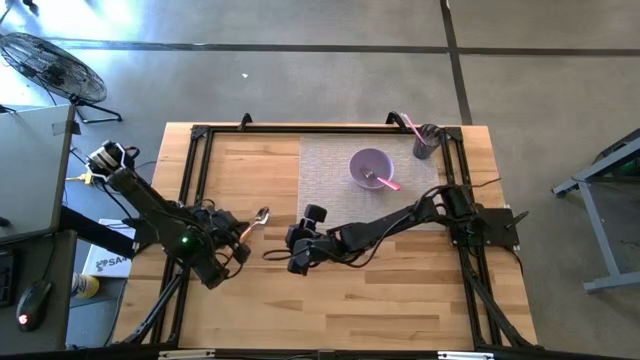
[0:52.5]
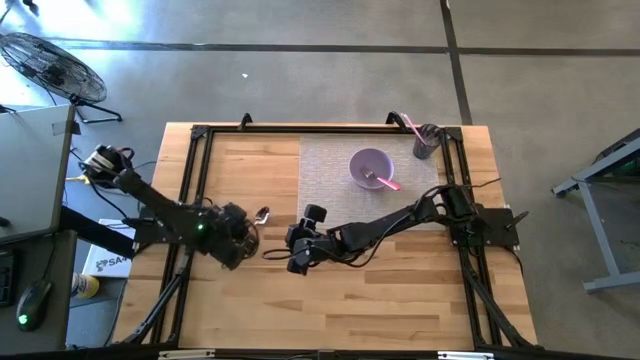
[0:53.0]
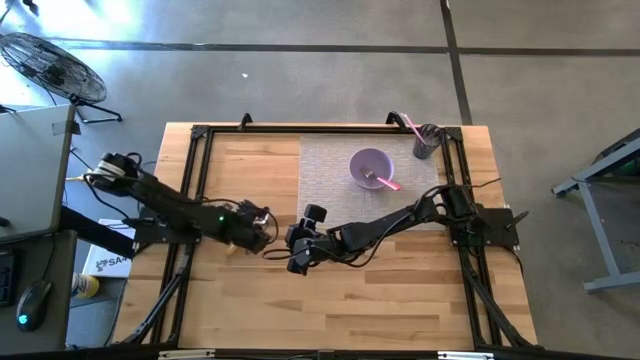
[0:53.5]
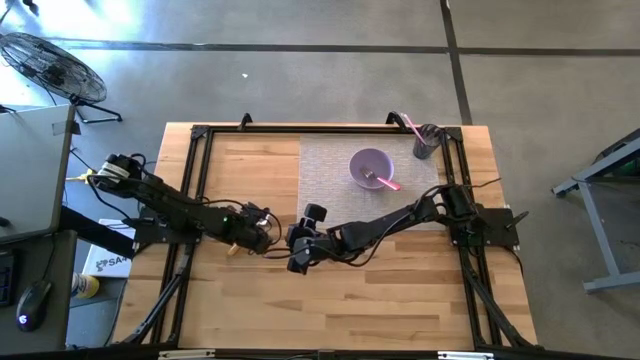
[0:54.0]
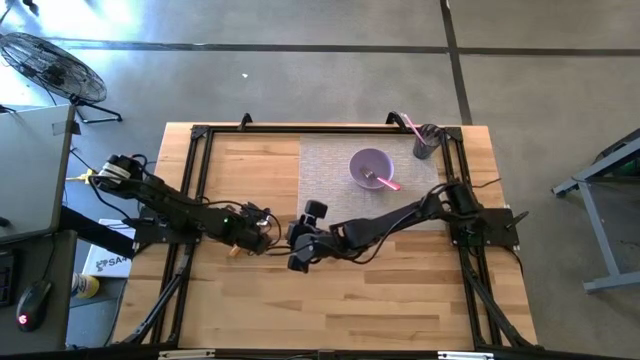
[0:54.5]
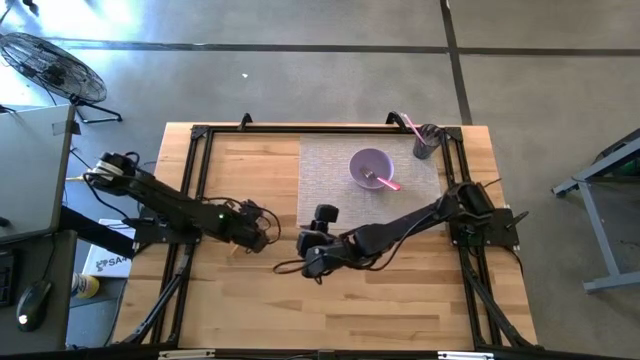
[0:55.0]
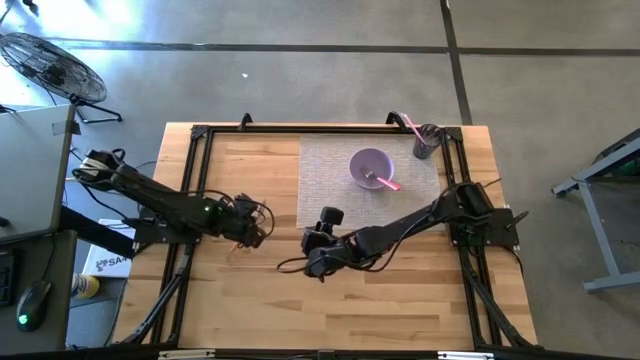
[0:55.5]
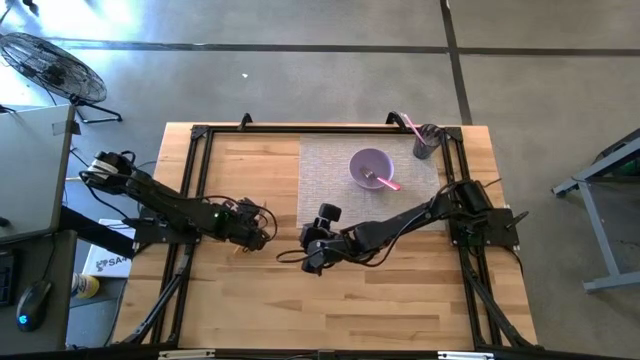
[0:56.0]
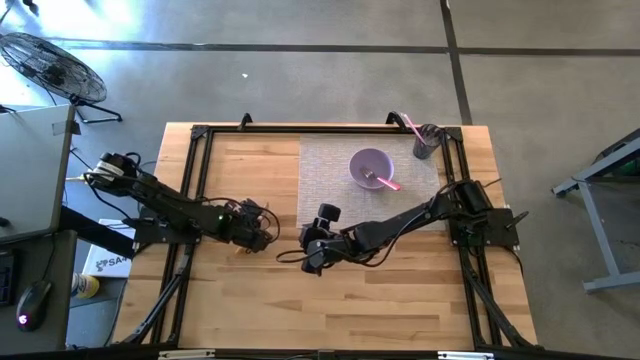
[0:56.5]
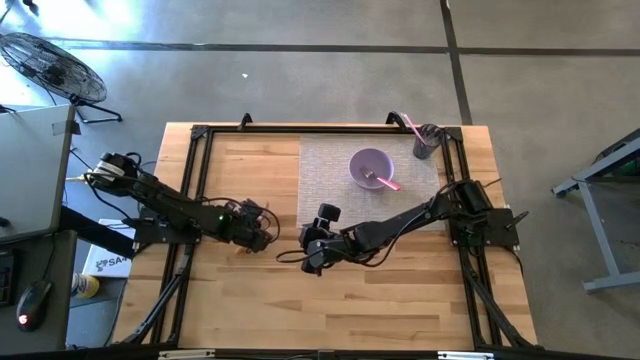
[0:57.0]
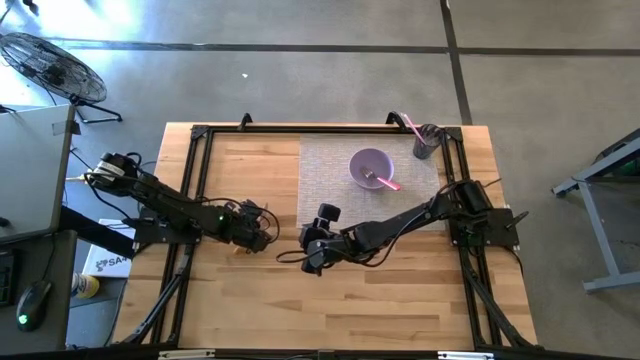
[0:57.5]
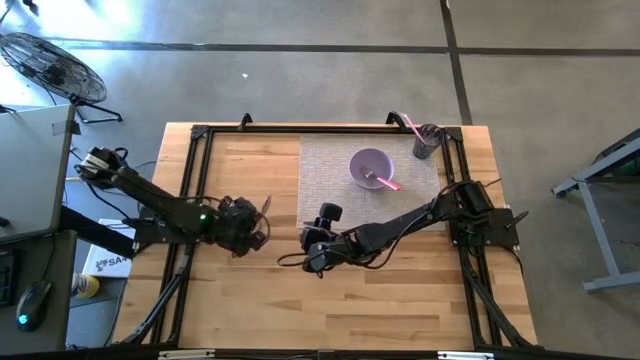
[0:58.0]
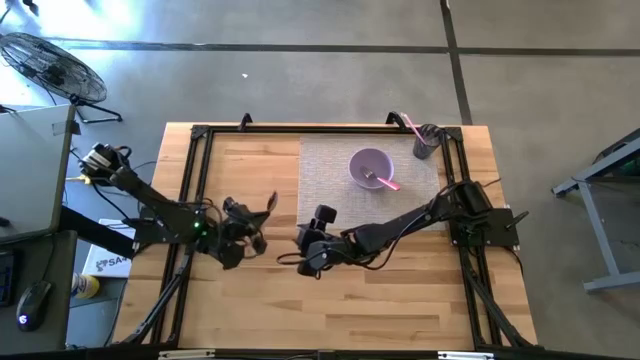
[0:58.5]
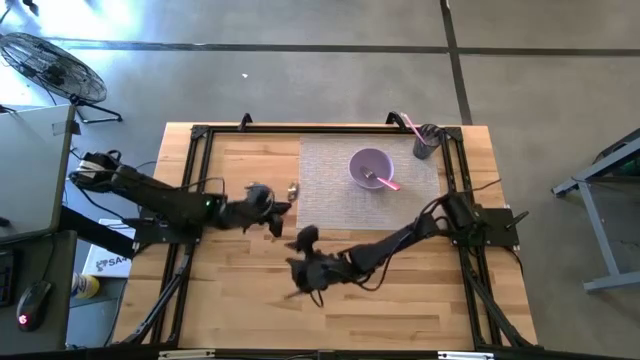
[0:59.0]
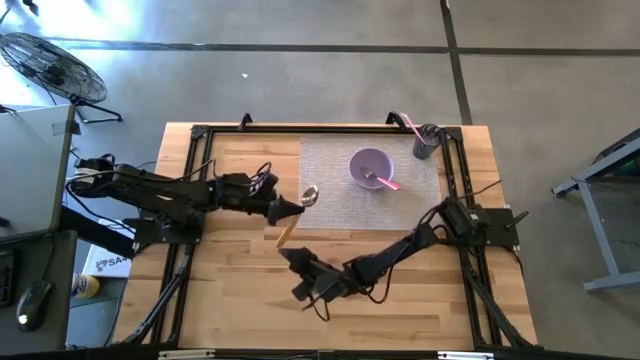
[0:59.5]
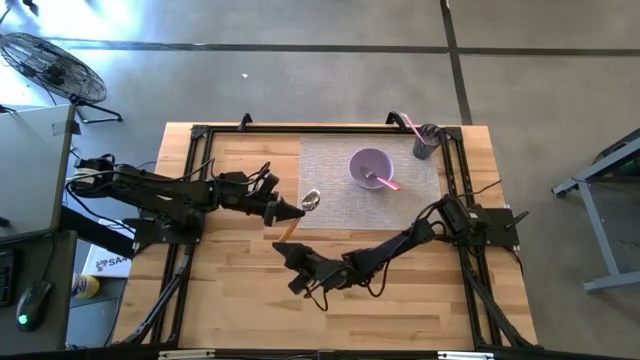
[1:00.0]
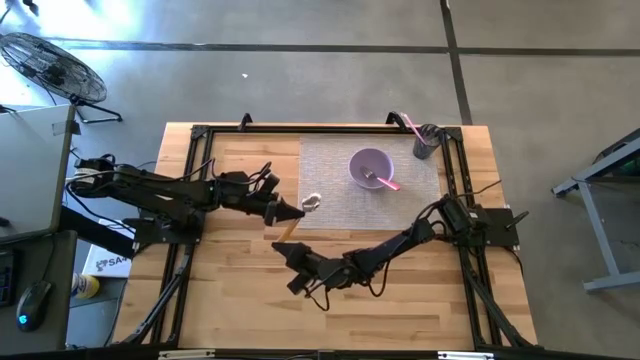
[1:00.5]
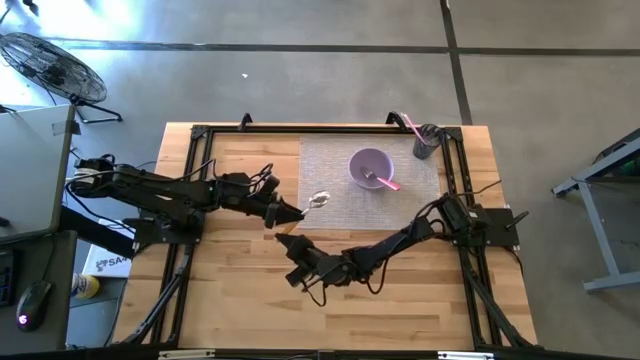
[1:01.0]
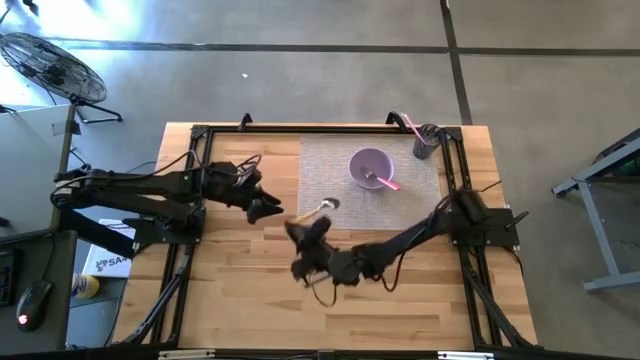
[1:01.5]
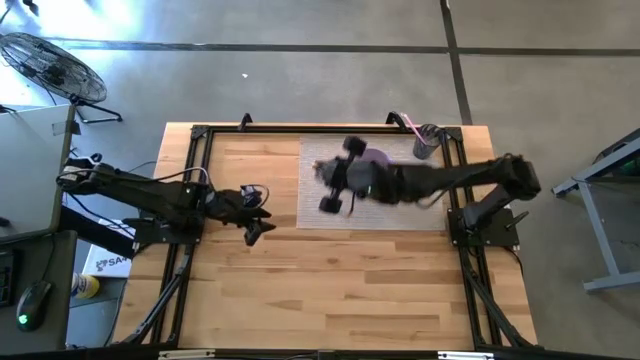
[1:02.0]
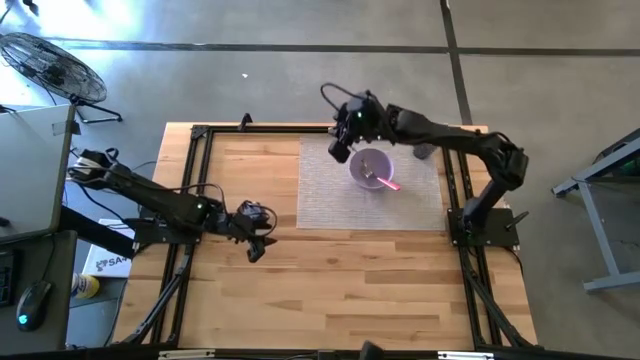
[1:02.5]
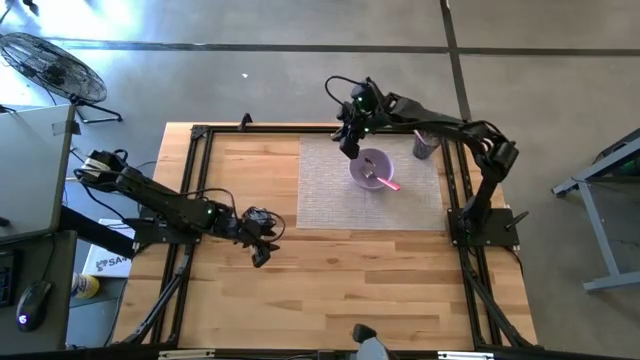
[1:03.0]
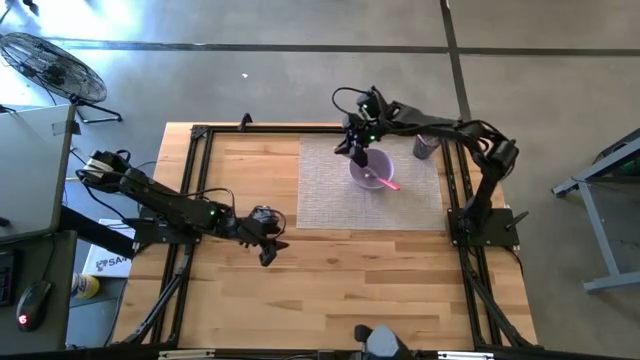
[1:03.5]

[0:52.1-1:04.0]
Task: Pick & Place Utensil
Put the light brown spoon into the bowl on the mat

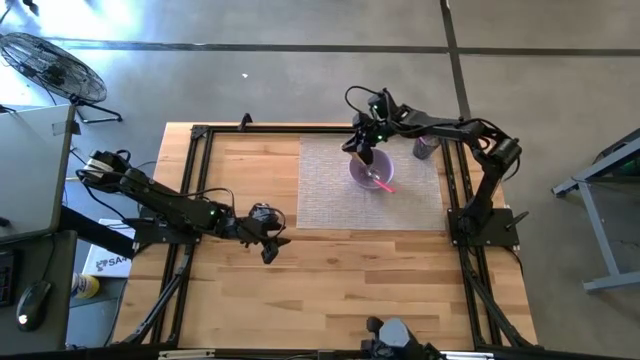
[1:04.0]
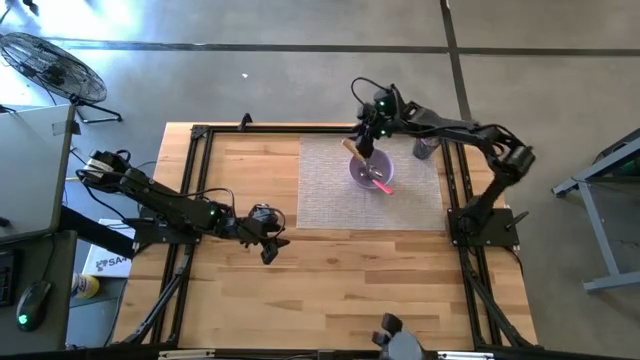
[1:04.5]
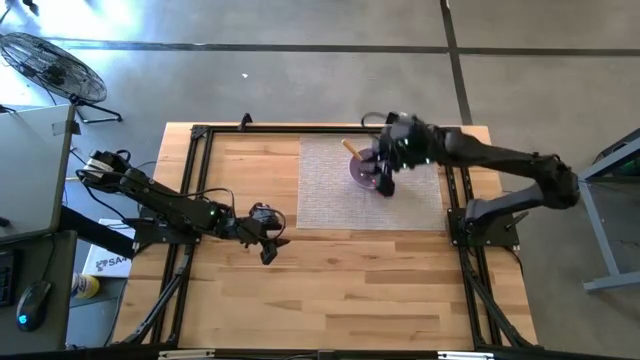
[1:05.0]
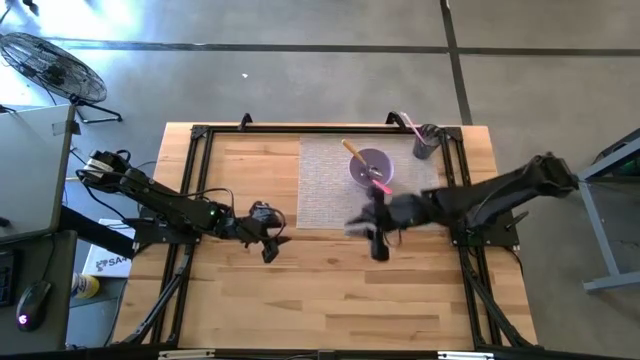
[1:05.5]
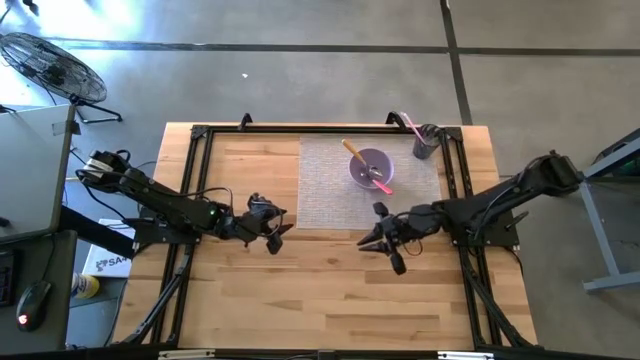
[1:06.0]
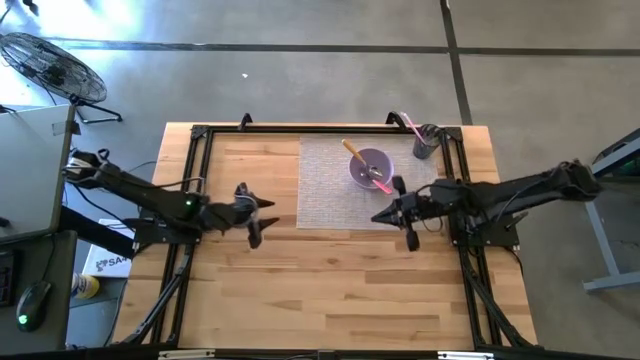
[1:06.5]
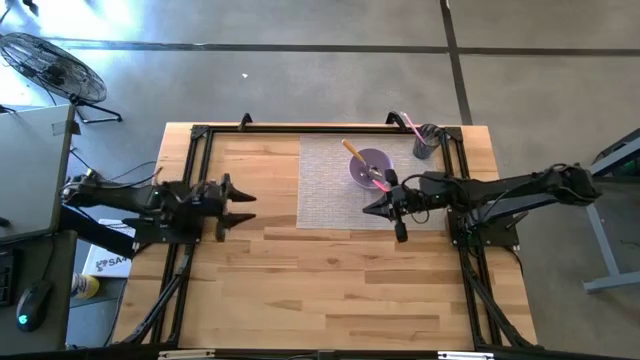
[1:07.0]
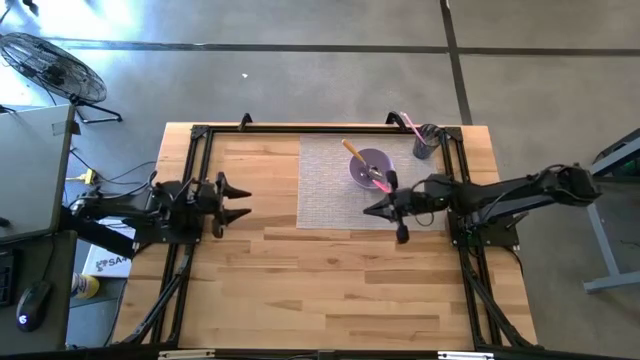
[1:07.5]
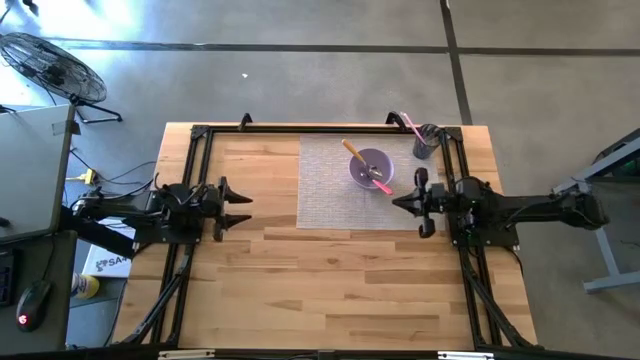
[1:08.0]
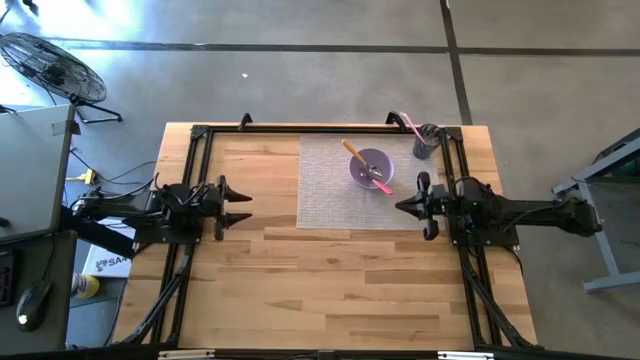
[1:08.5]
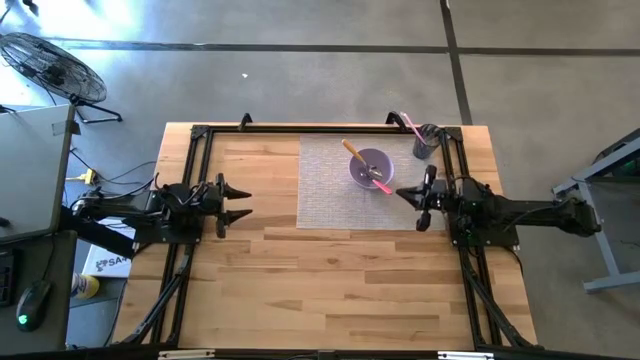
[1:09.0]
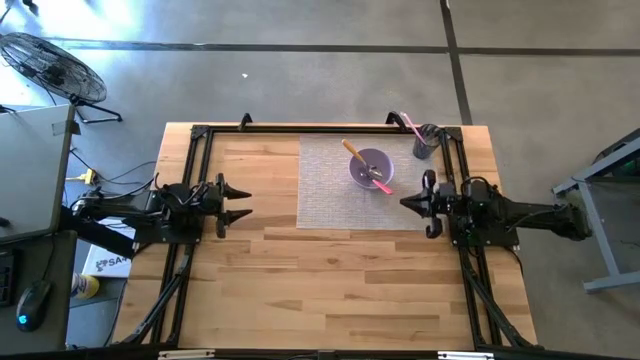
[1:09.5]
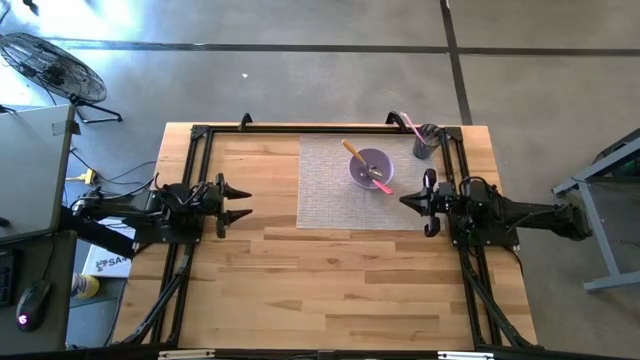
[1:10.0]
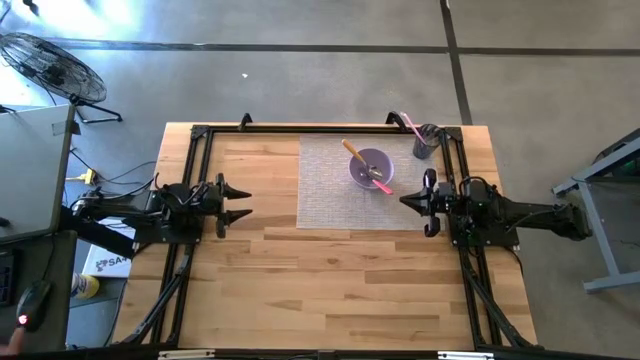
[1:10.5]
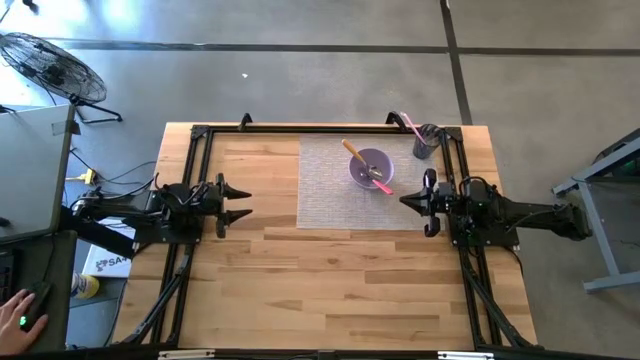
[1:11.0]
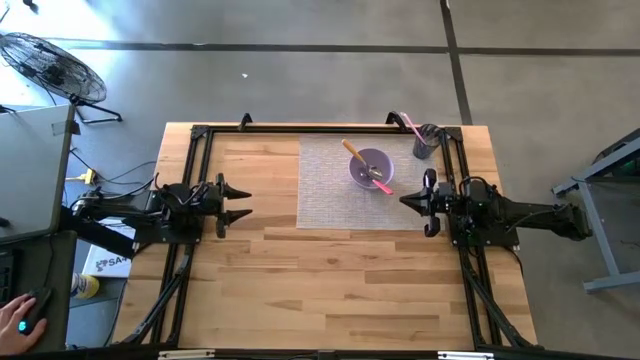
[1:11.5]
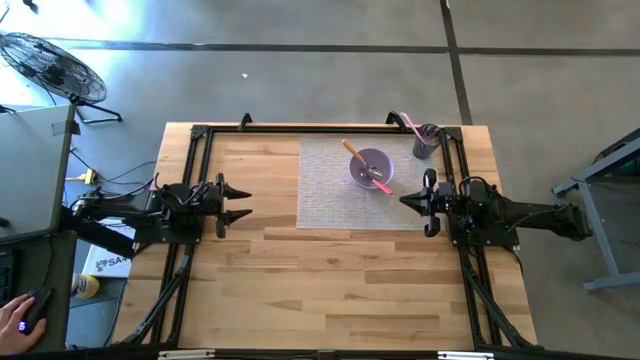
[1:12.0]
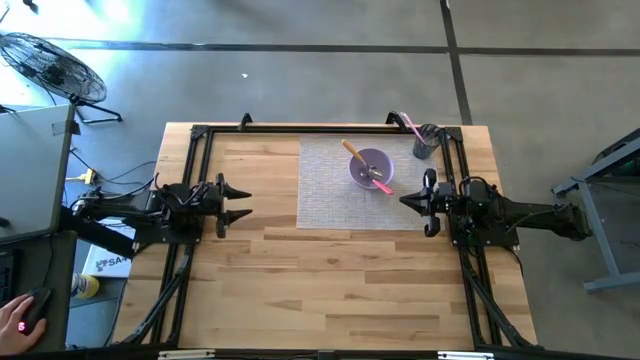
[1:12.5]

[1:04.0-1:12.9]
Return to Home Position
